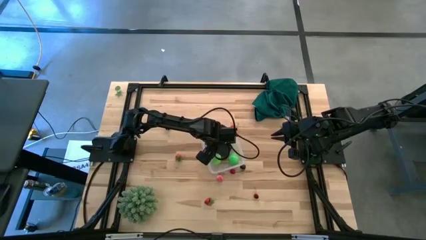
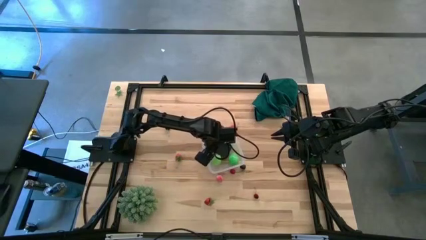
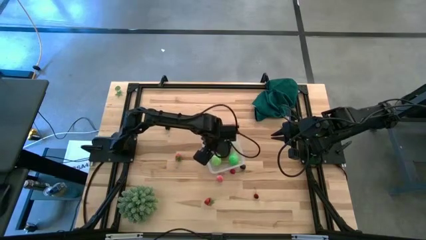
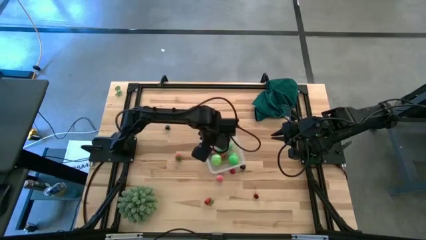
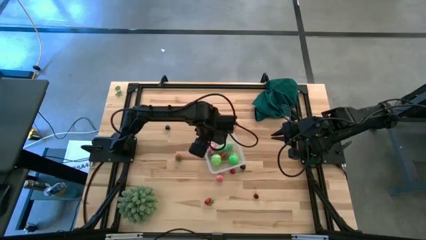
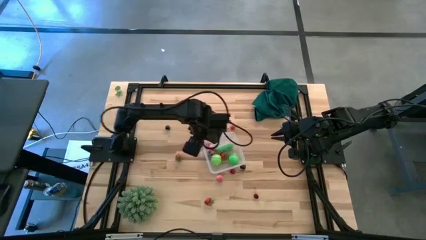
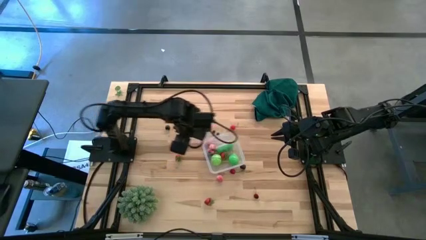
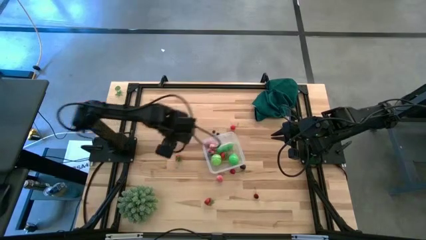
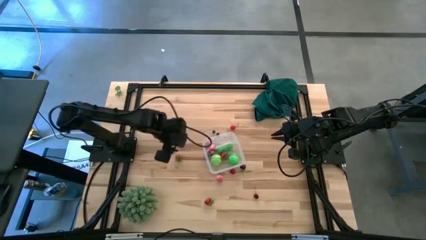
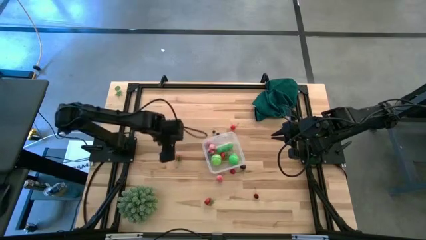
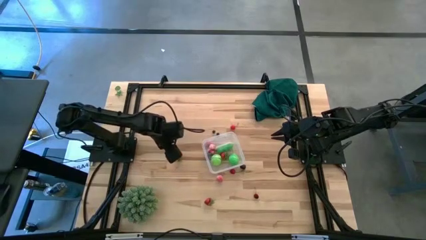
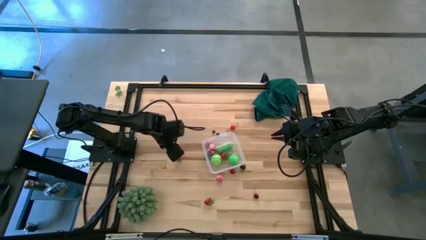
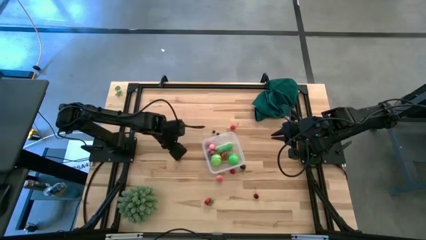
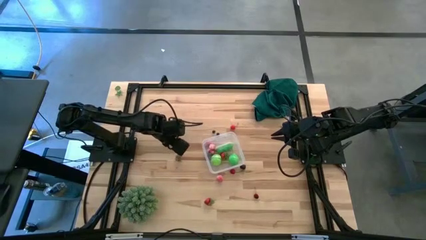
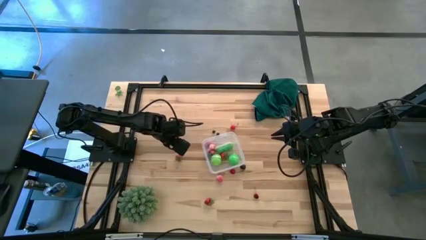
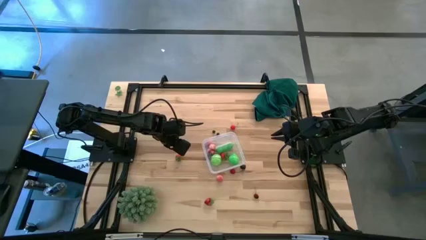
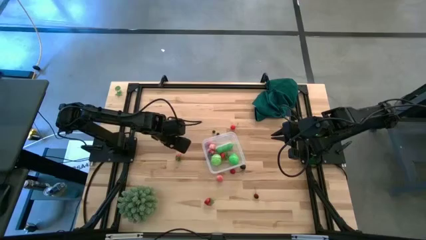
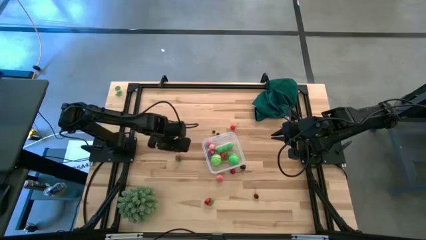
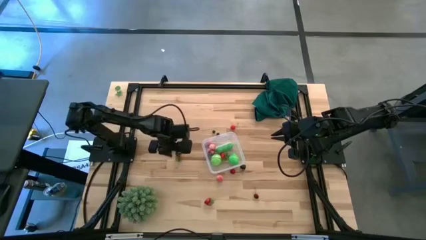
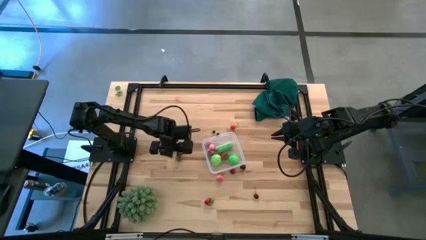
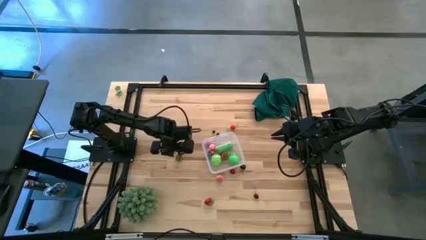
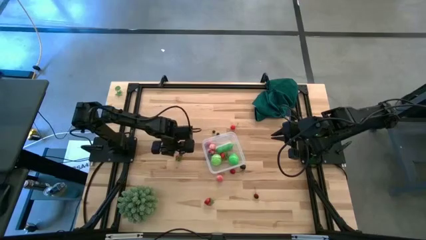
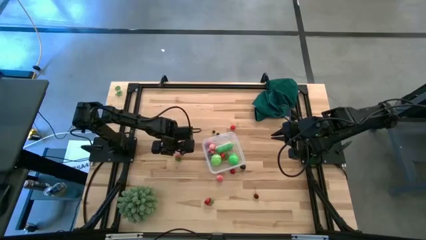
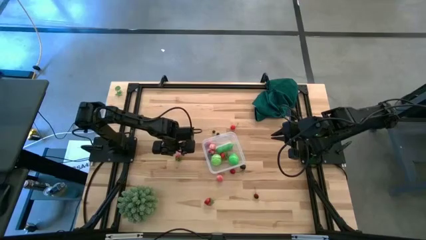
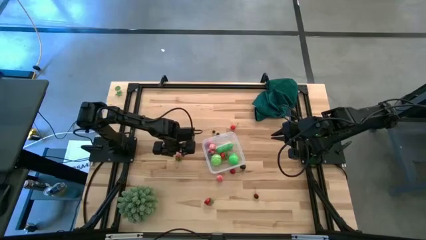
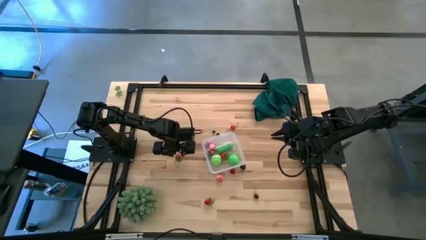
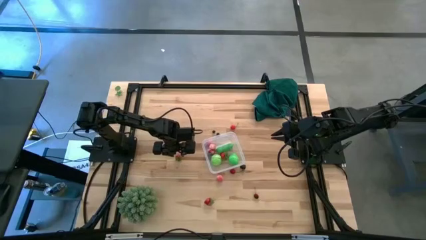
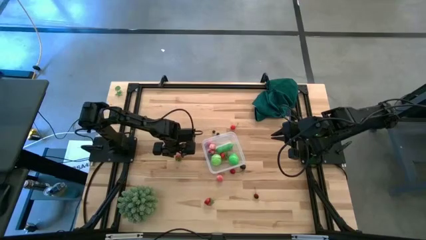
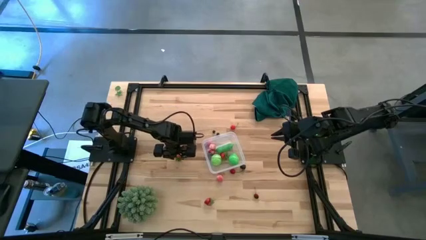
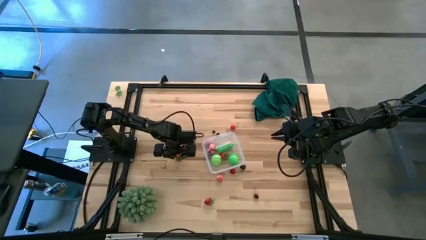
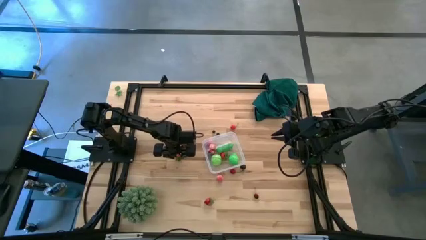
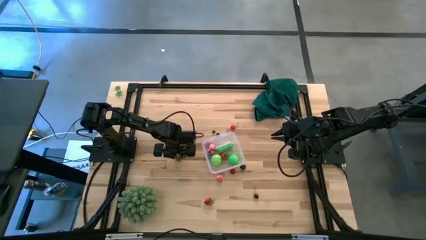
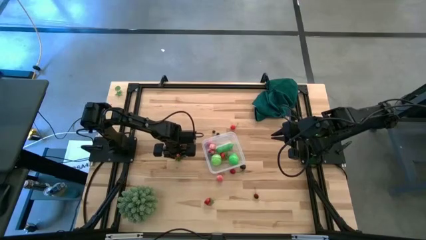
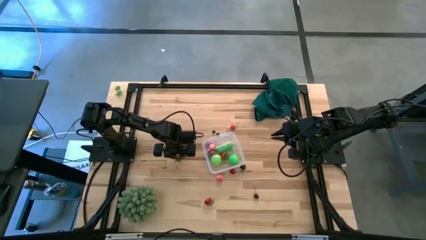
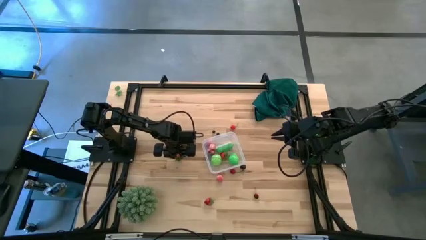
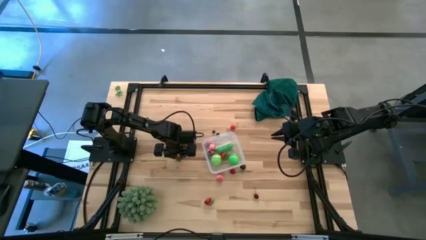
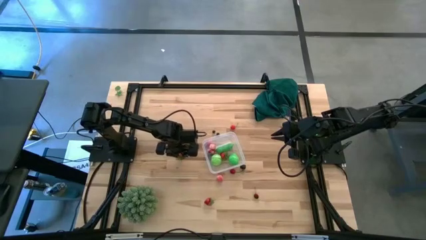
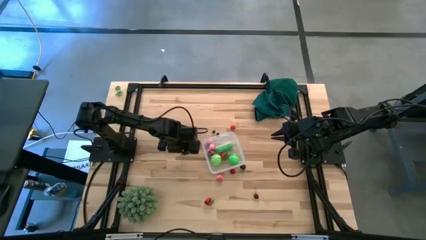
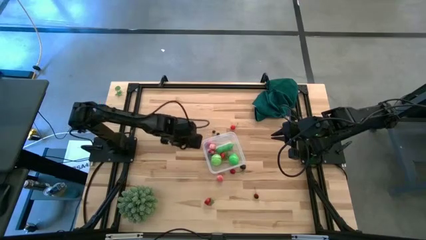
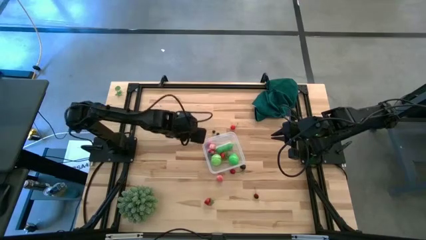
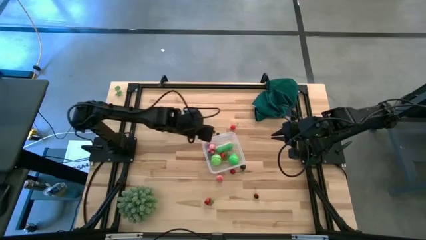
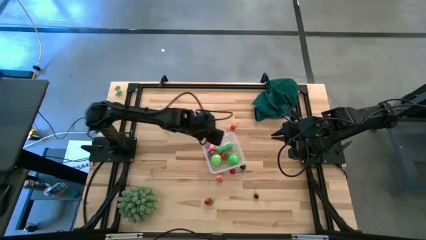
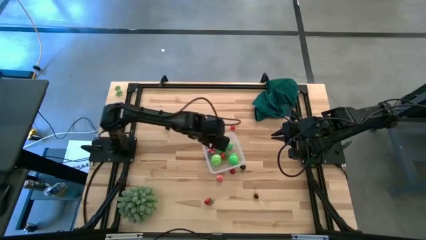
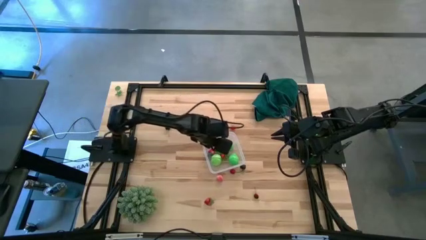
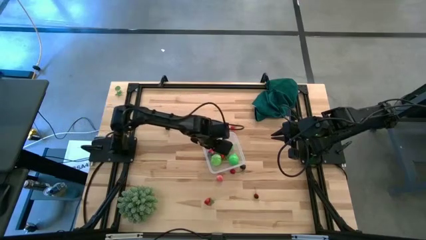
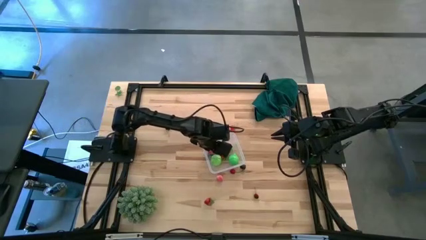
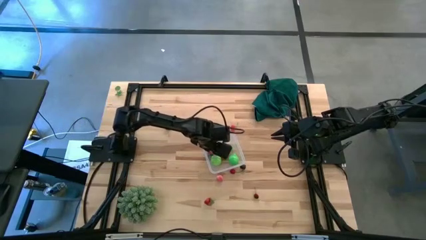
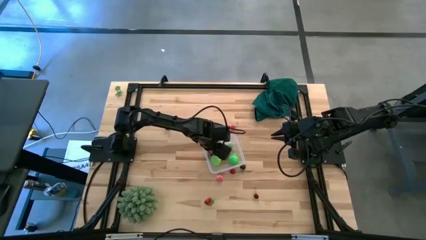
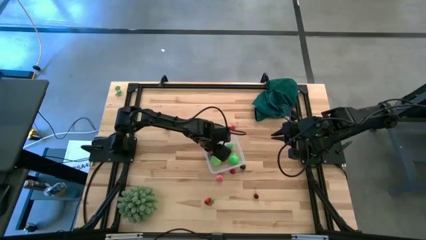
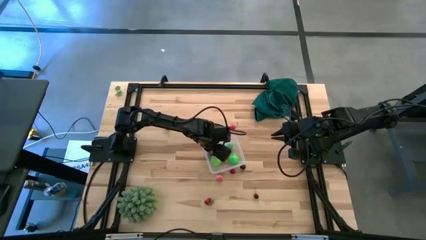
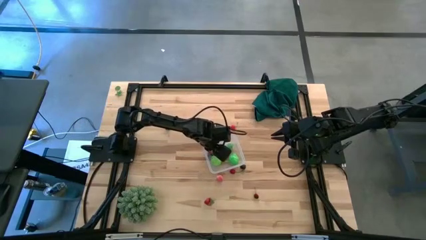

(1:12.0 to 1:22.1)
Task: Pick and placing Produce into tupperware
Put the red strawberry into the transparent container

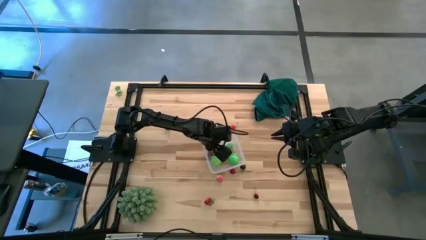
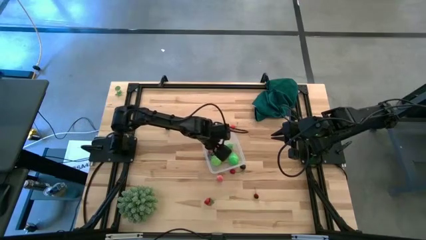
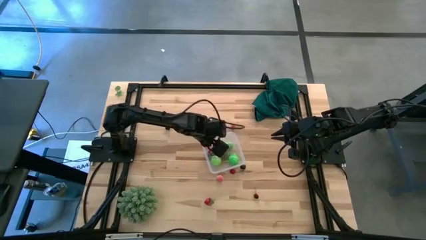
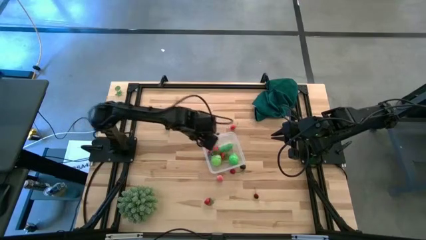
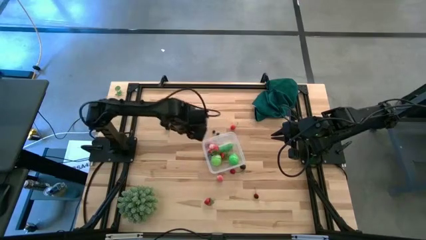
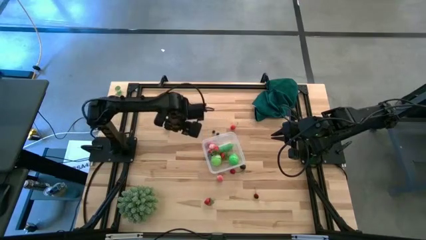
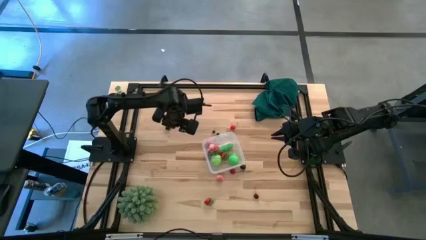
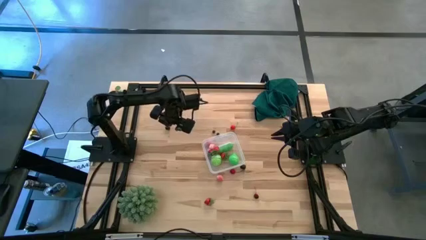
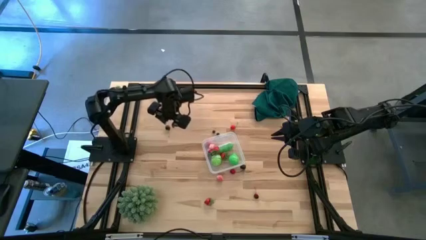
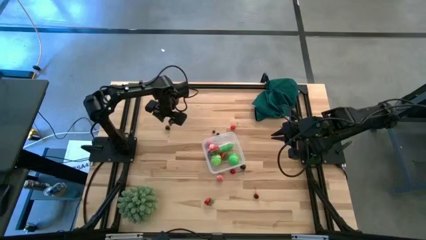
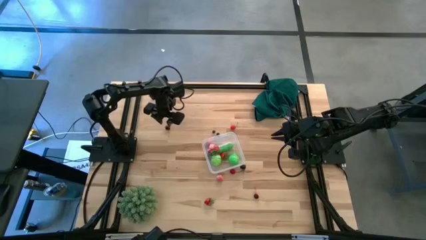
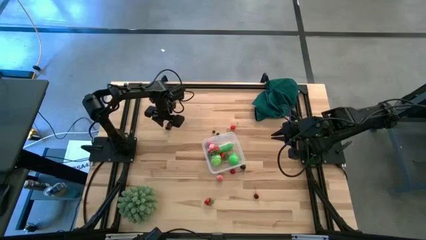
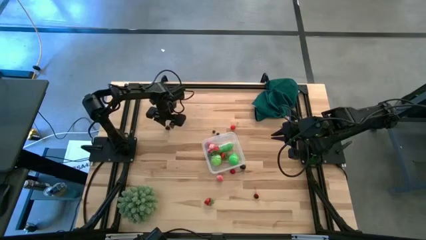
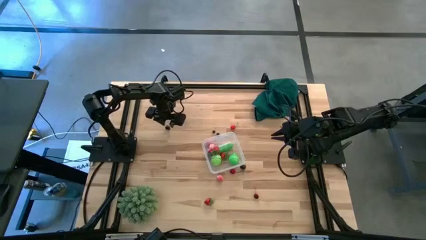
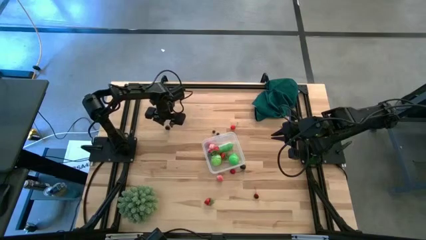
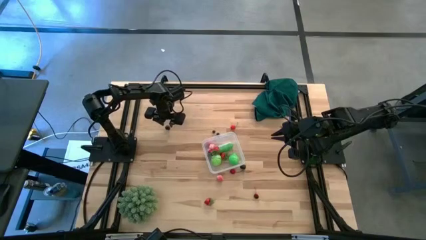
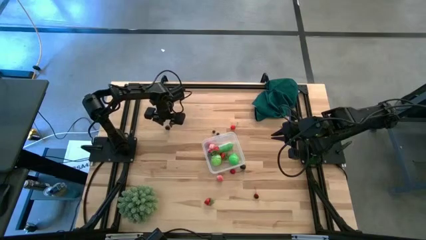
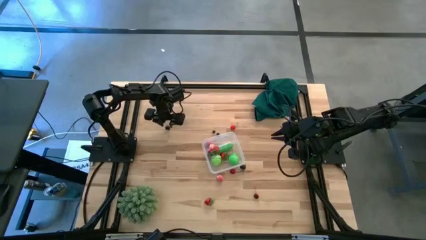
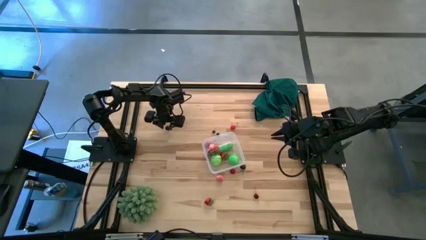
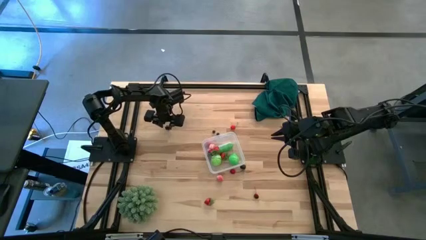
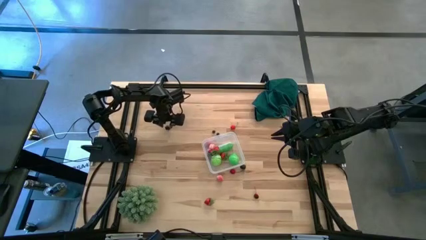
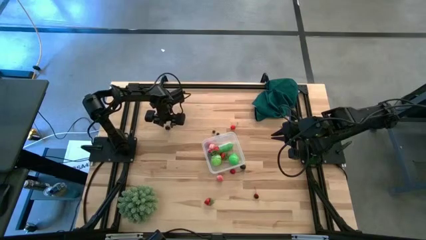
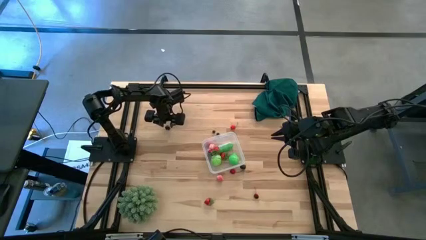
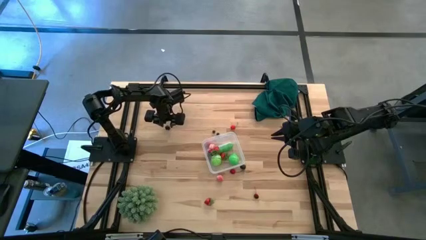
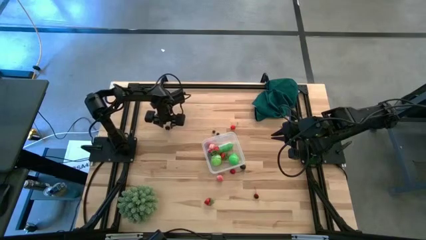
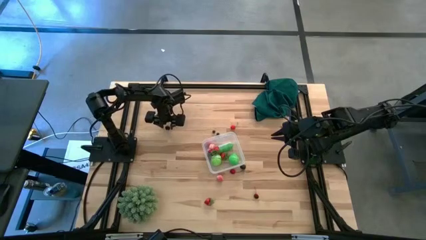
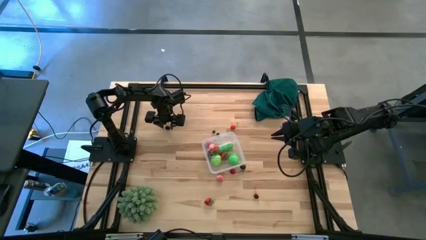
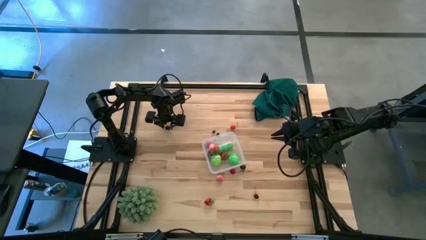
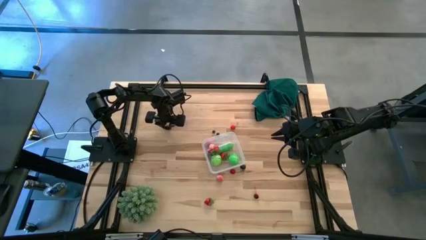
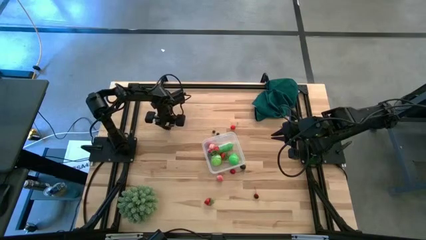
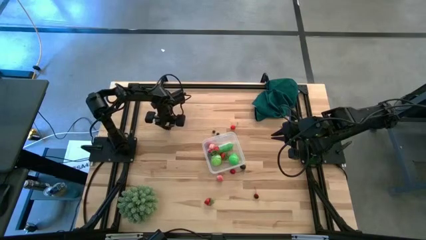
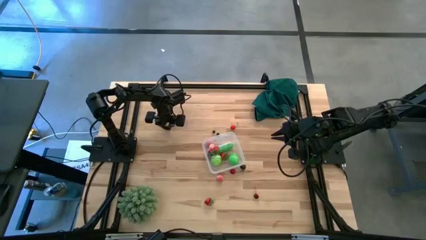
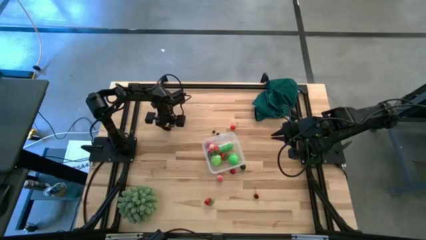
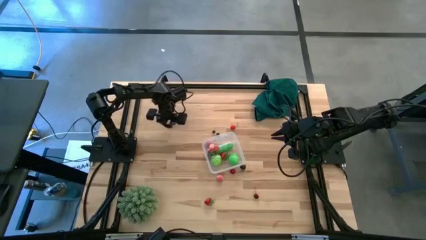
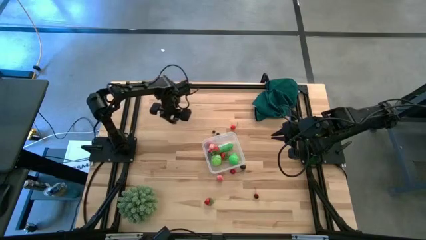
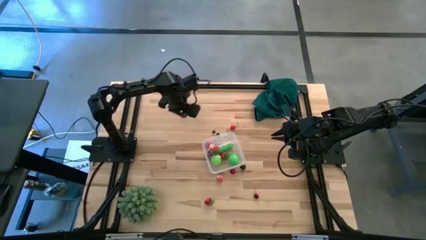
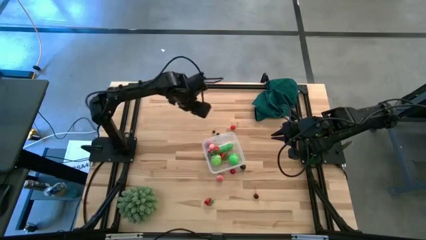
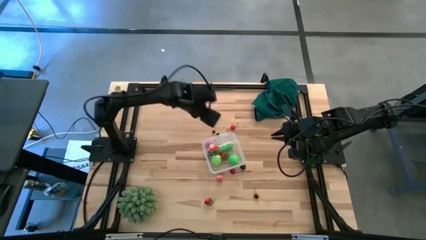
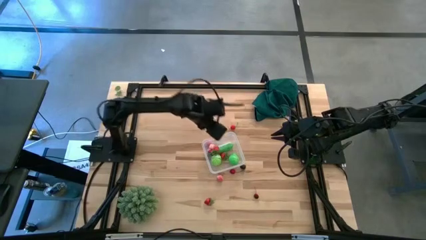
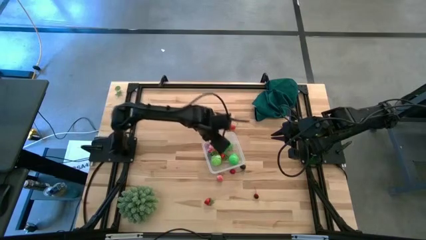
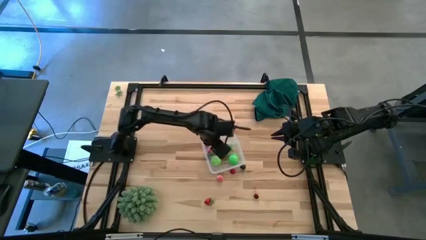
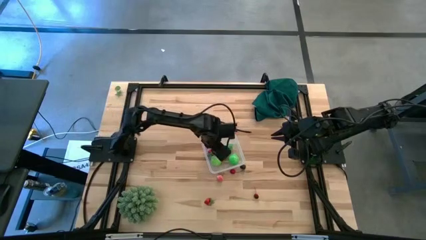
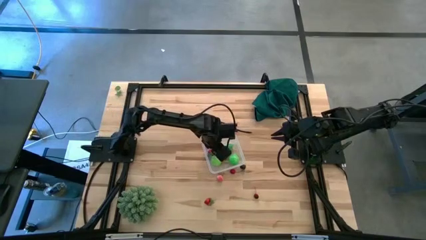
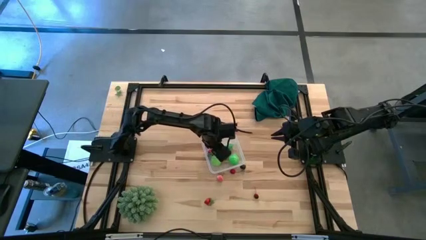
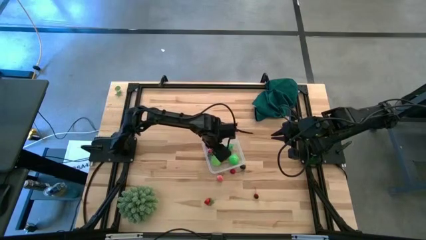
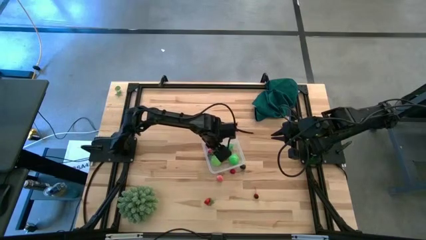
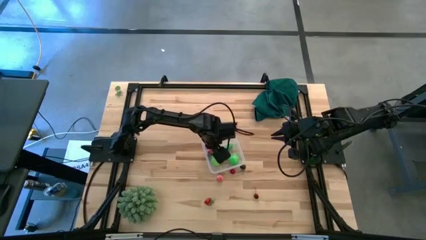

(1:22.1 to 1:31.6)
Put the black cherry into the transparent container
